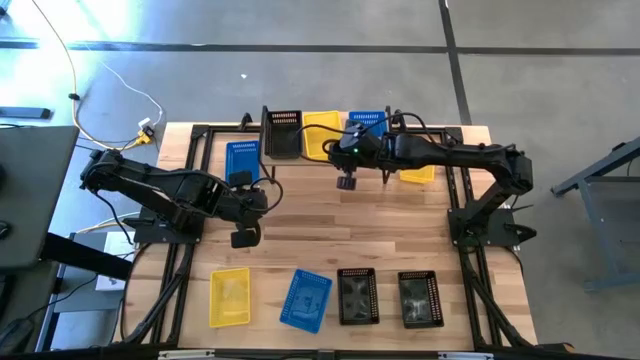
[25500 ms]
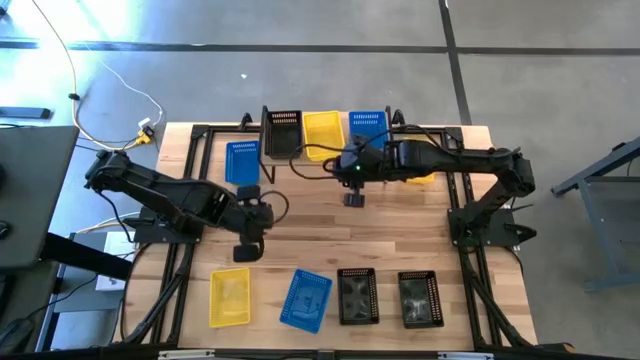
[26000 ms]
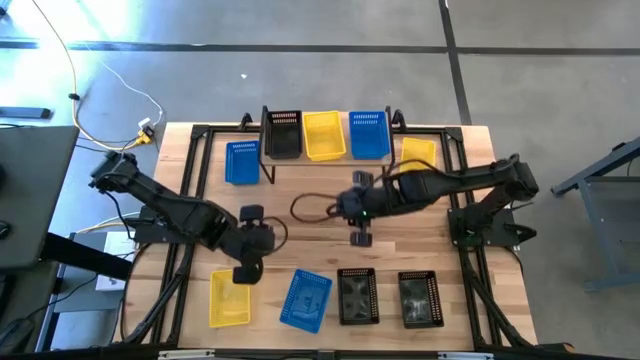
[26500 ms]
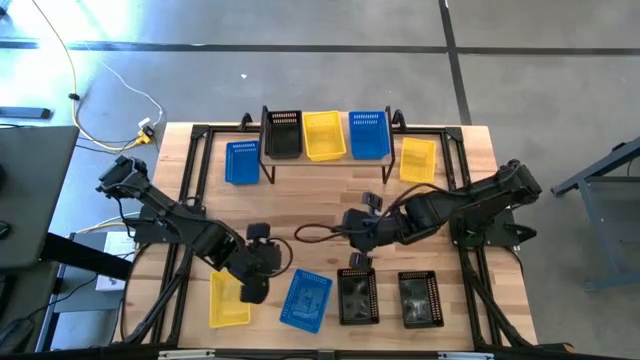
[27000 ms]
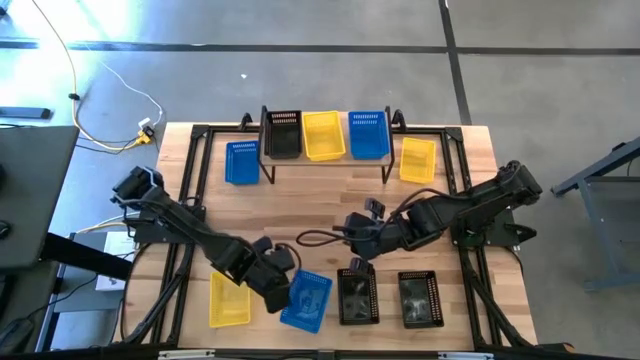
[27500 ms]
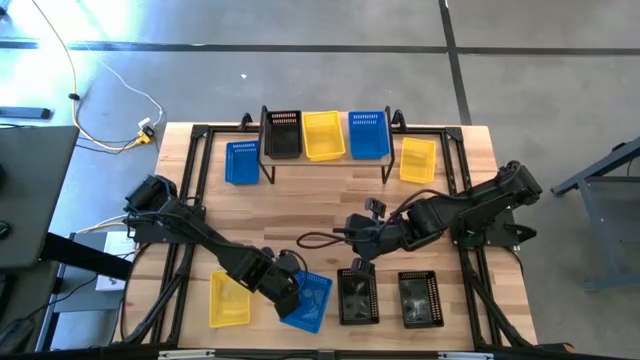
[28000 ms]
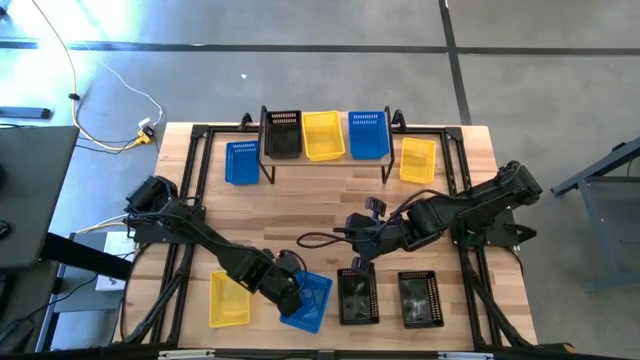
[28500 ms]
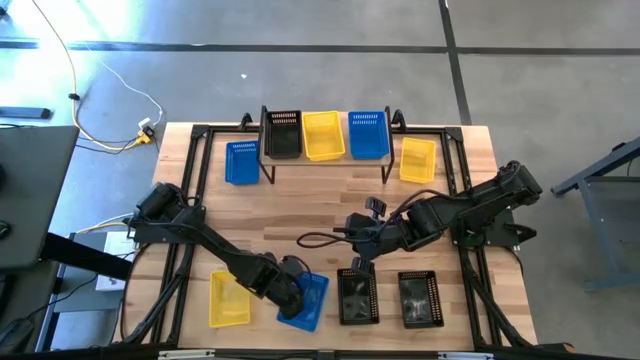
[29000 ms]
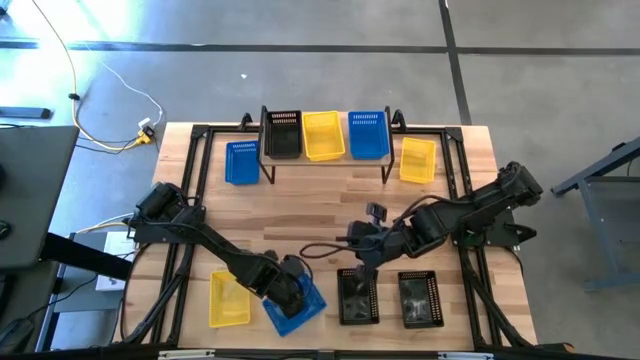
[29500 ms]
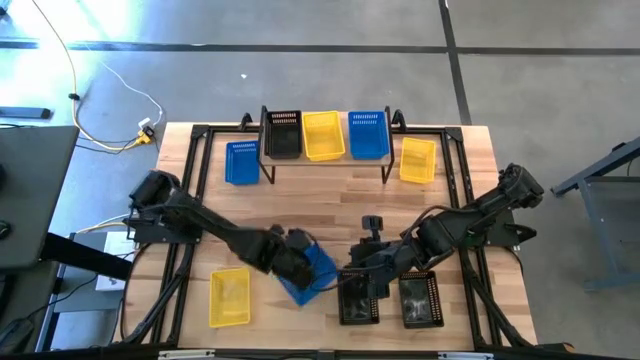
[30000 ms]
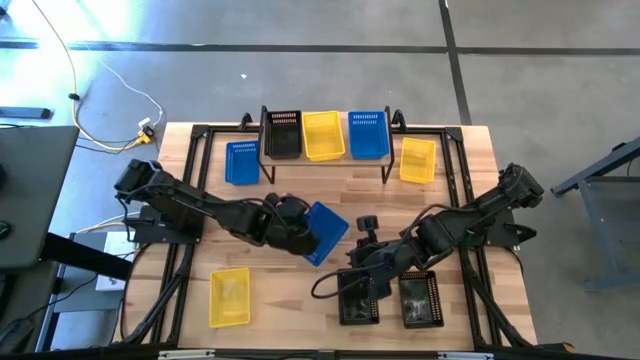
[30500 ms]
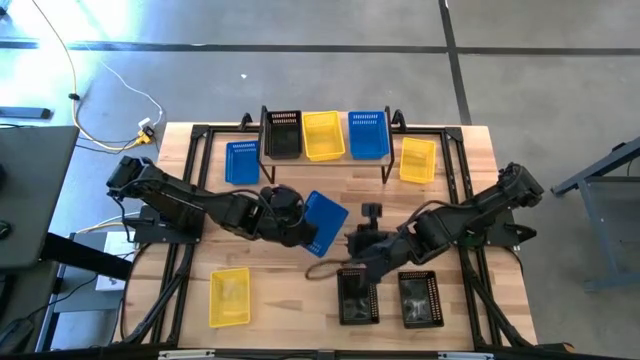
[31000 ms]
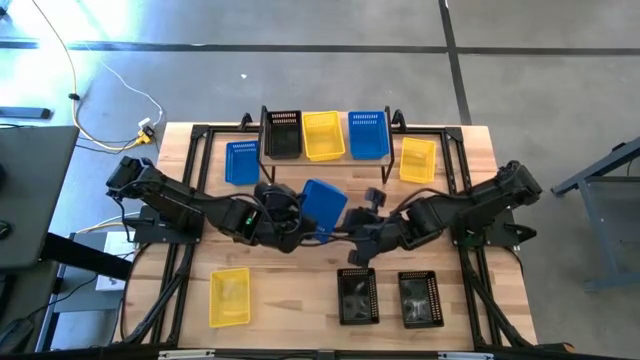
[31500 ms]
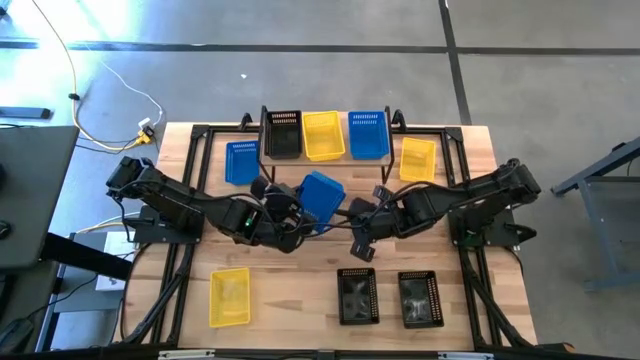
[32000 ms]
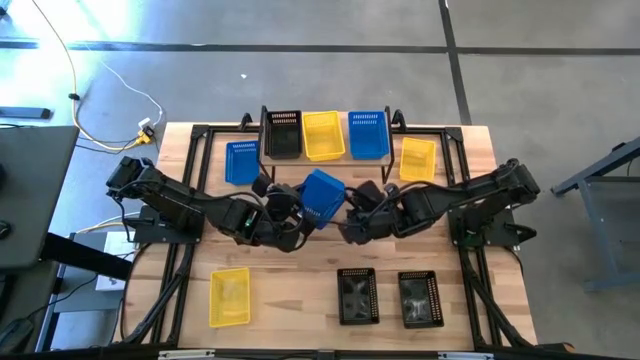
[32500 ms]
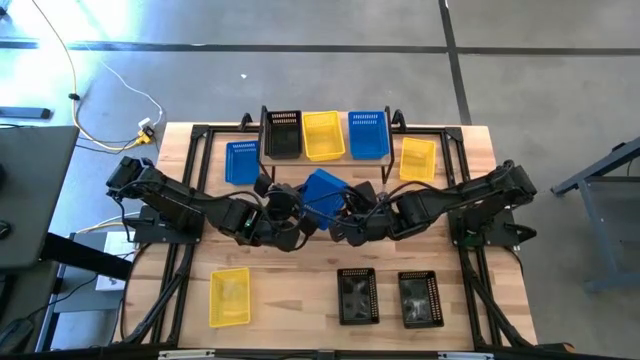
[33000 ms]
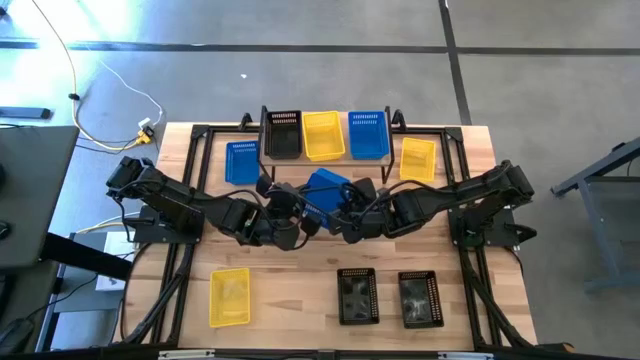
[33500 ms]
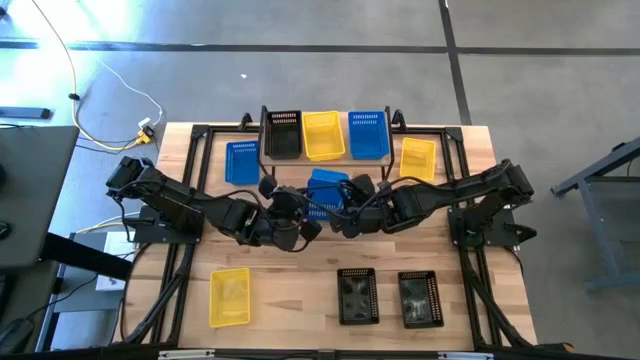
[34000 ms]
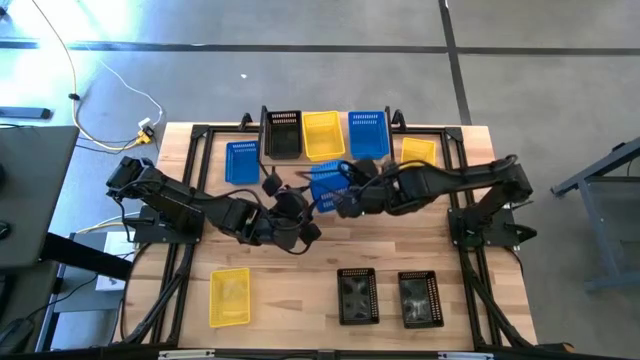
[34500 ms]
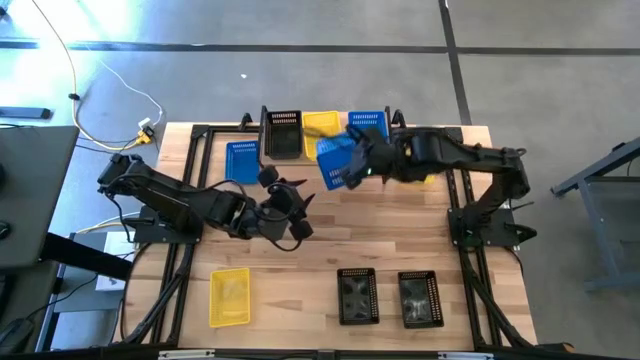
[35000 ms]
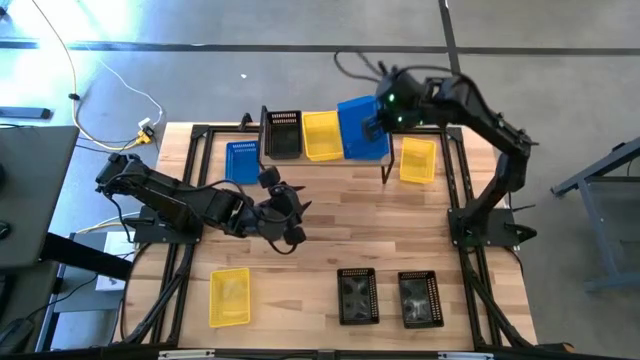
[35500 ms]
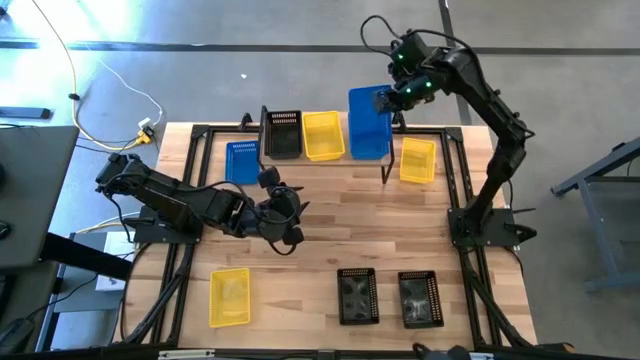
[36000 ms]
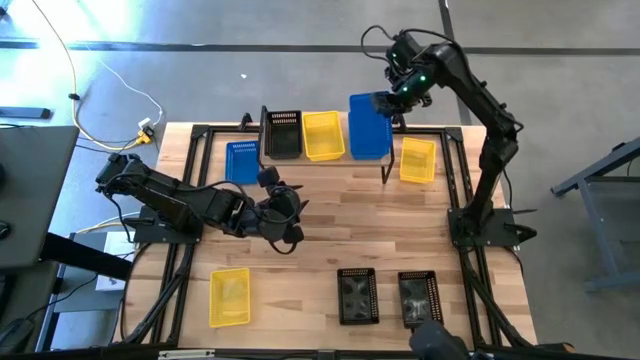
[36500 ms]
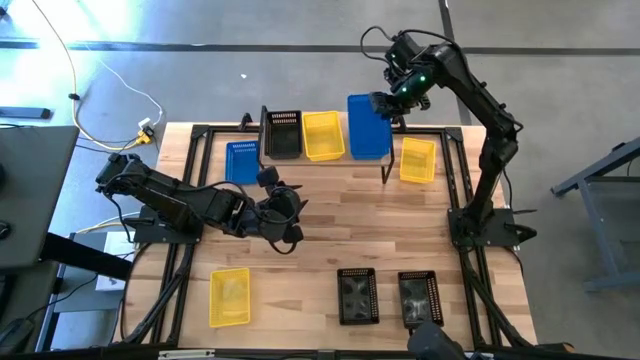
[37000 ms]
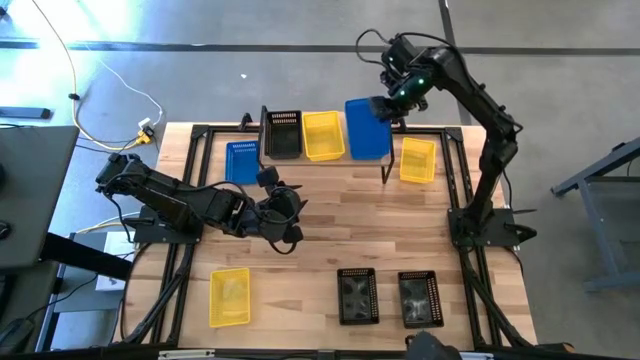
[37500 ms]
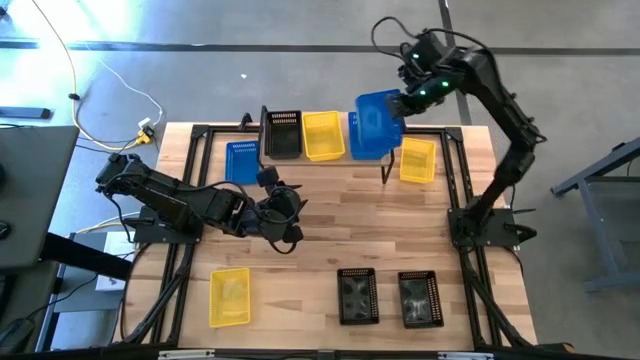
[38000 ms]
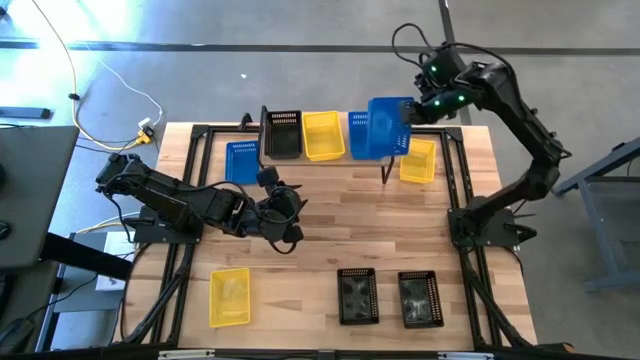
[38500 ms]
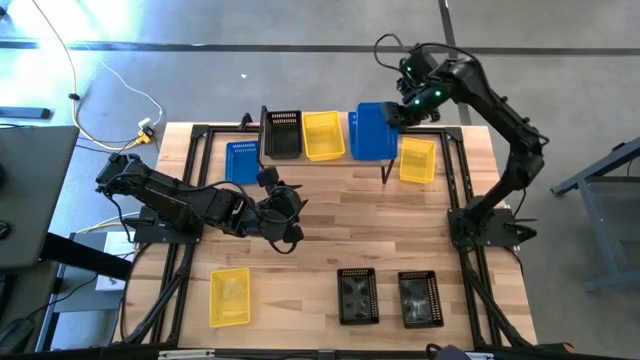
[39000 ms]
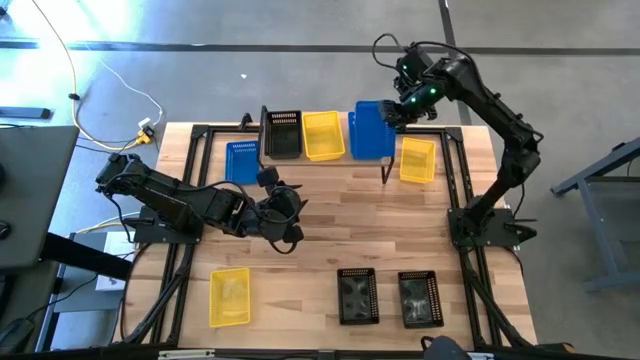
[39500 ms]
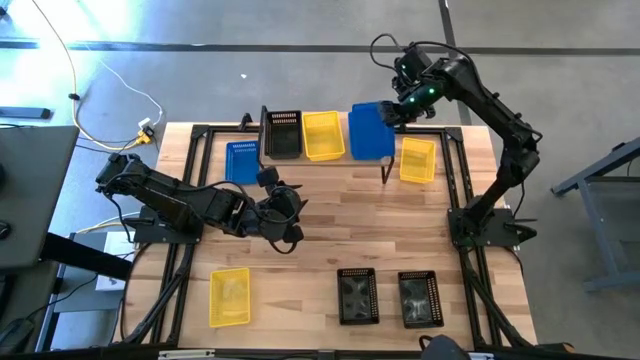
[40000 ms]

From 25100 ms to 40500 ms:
Task: Stack baskets on shelf by color
Stack the bottom blue bin on top of the blue bin on the shelf

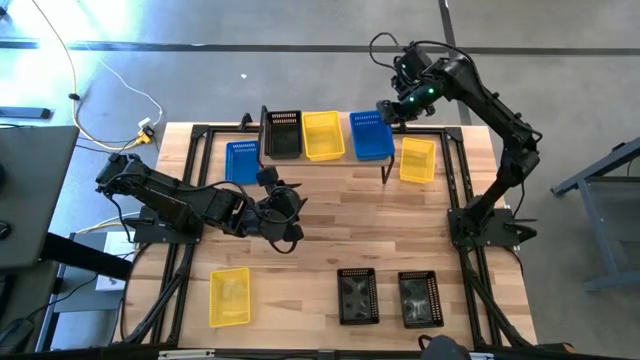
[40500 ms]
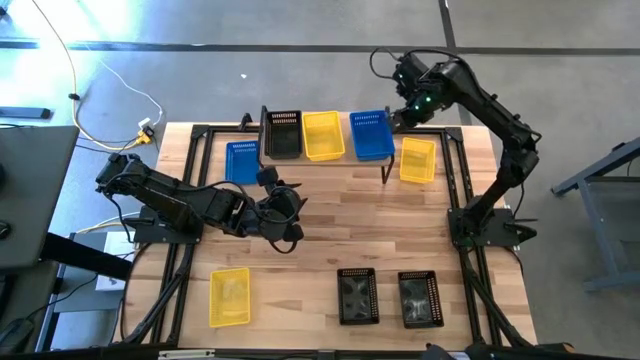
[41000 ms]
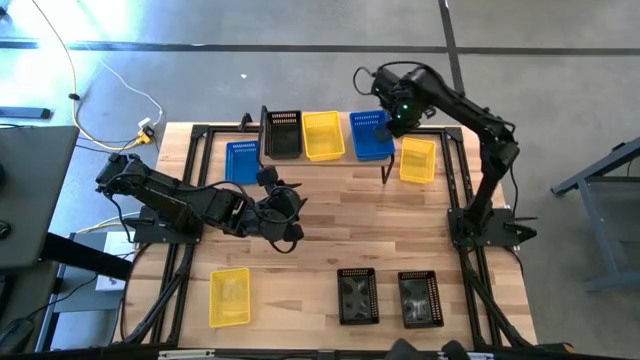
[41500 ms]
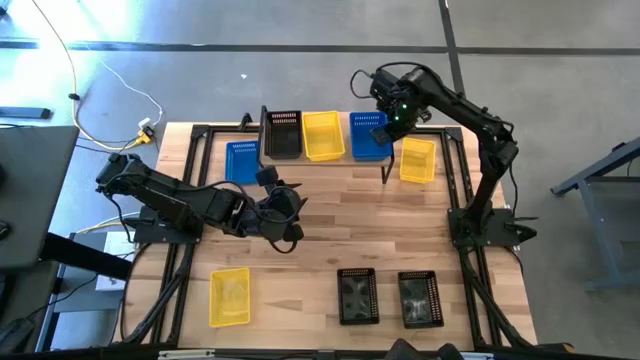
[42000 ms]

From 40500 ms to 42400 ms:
Adjust the stack of blue bins on the shelf

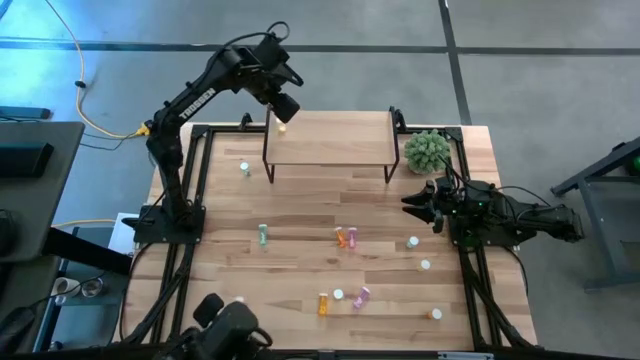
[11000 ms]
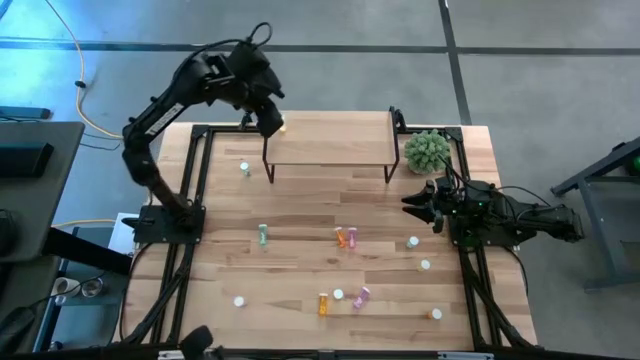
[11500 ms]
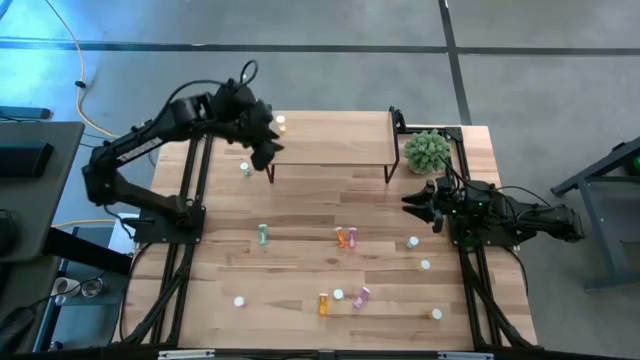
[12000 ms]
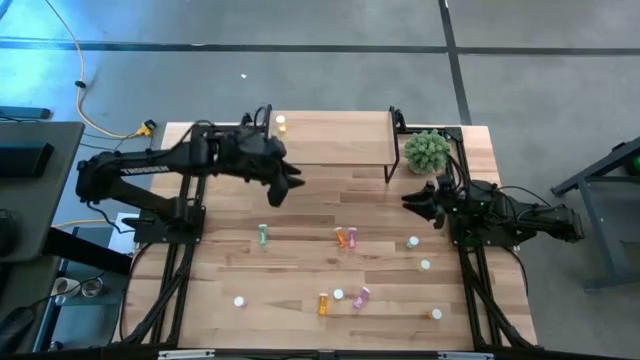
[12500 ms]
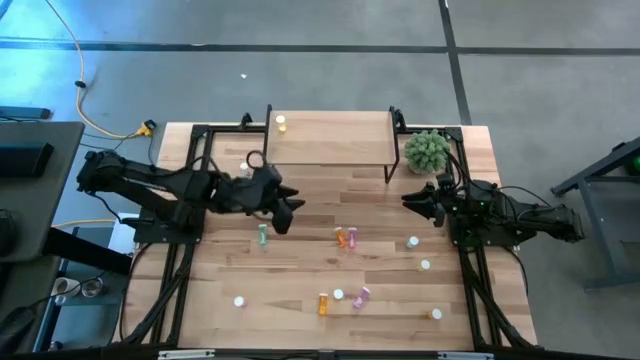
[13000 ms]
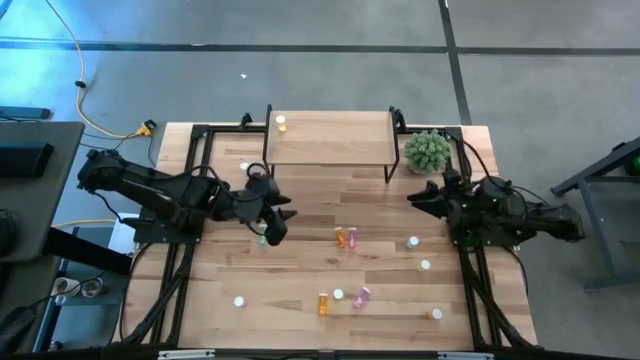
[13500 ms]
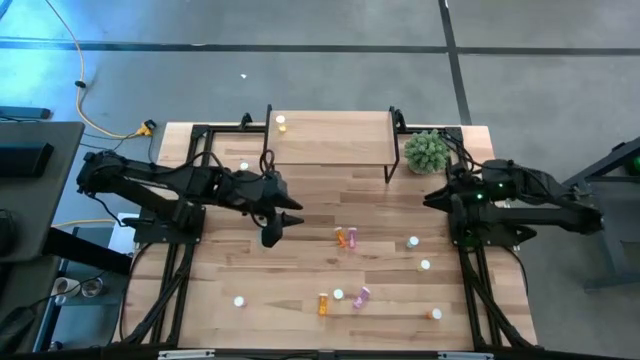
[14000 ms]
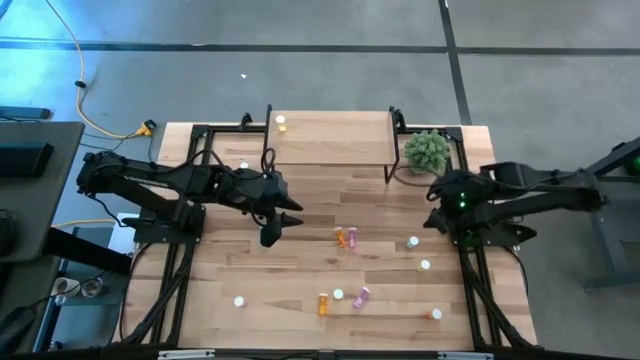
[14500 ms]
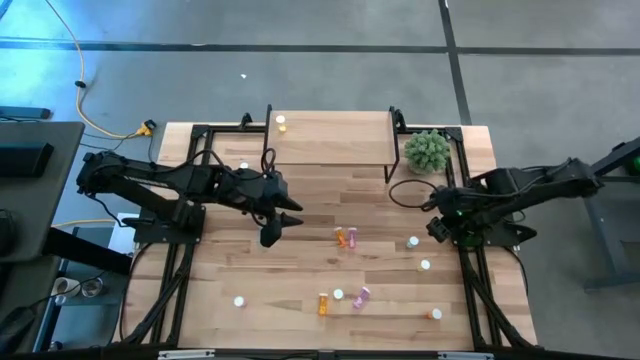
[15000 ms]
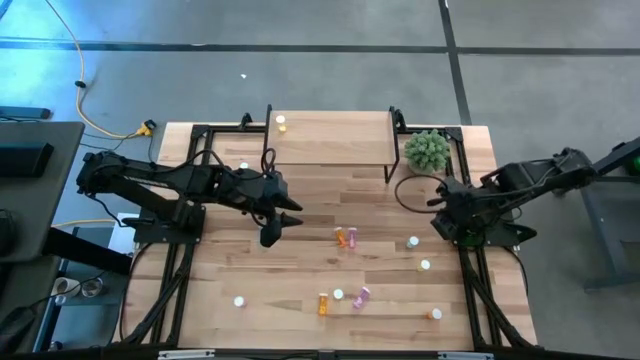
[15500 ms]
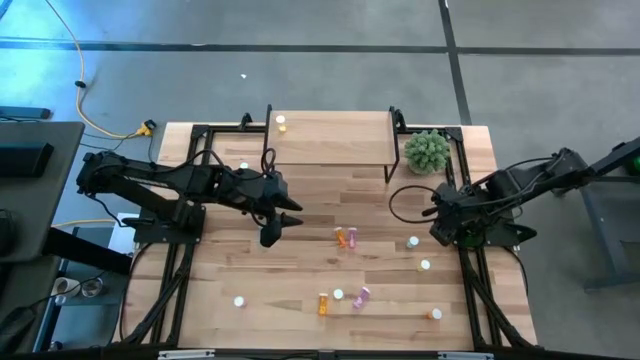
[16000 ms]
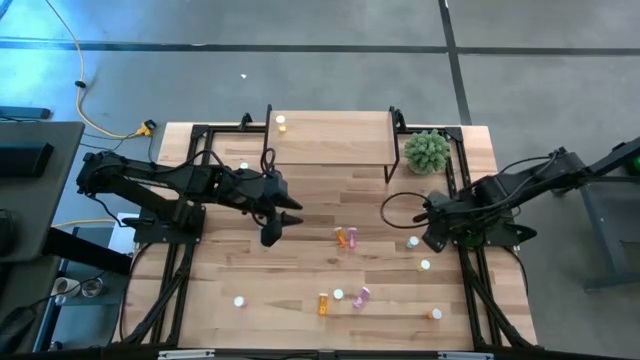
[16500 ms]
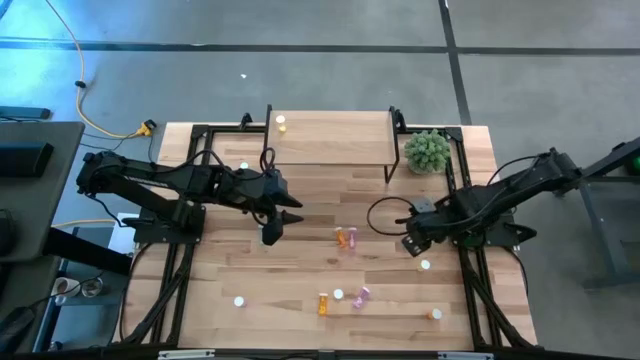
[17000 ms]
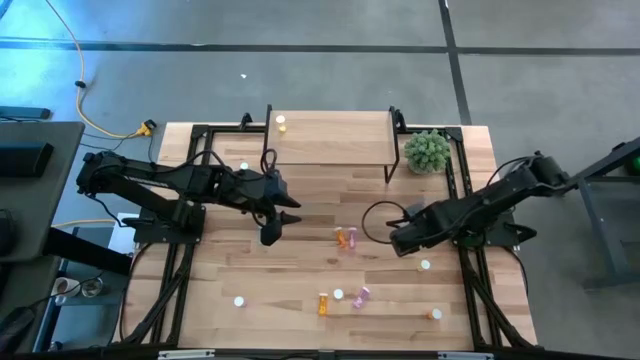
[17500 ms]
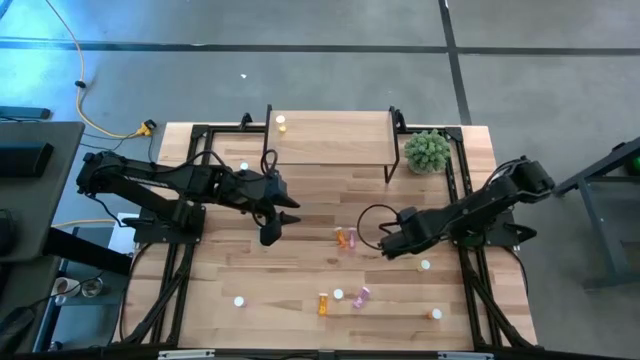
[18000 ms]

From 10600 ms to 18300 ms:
Task: Pick and place medicine bottles onto shelf by color
Put the right blue pill bottle on the shelf
